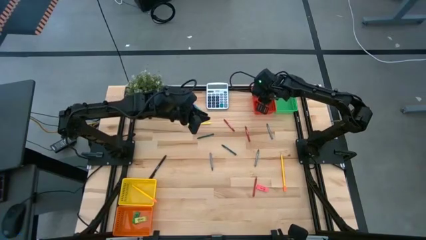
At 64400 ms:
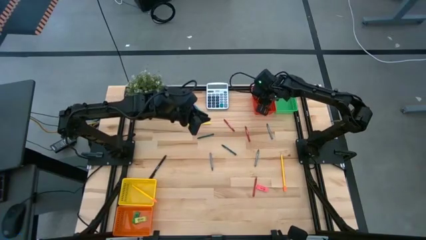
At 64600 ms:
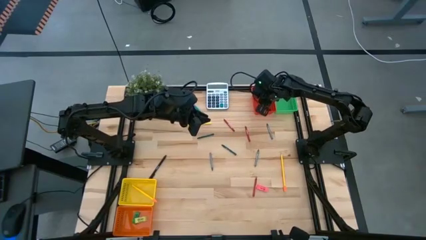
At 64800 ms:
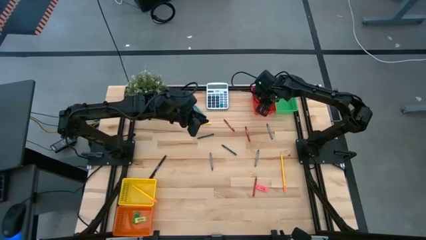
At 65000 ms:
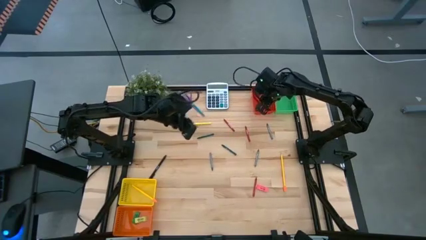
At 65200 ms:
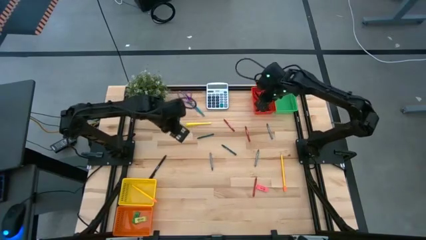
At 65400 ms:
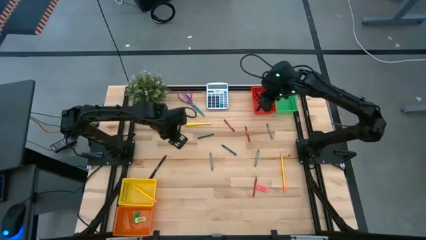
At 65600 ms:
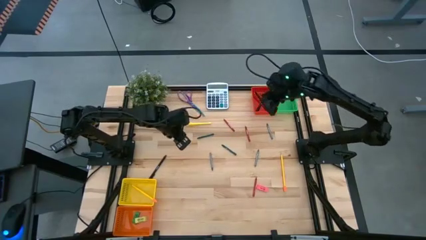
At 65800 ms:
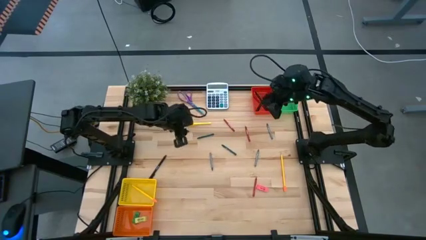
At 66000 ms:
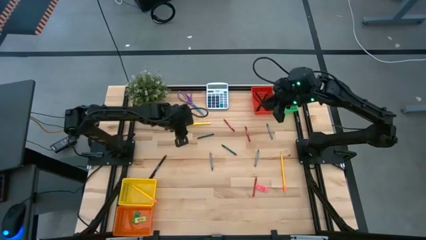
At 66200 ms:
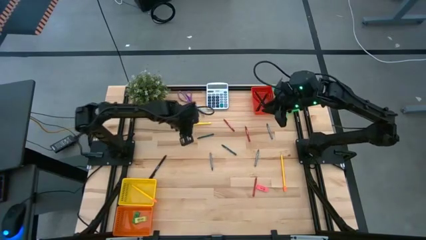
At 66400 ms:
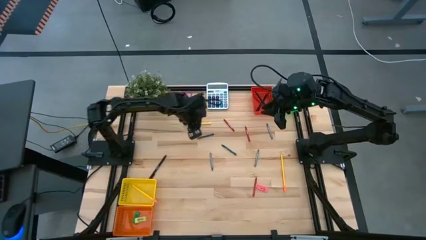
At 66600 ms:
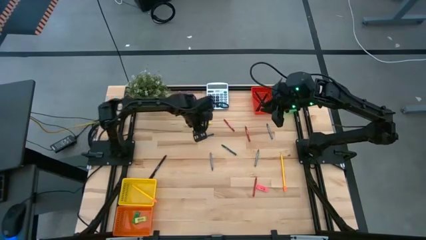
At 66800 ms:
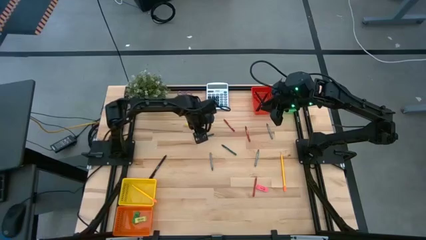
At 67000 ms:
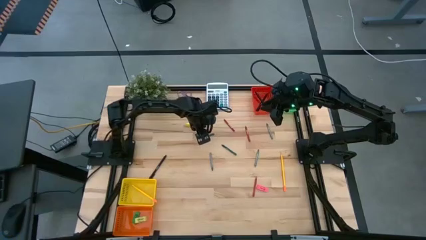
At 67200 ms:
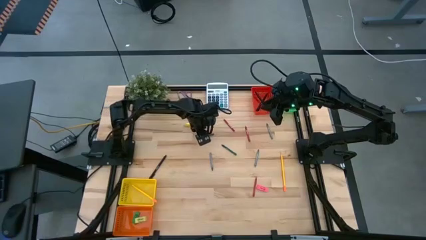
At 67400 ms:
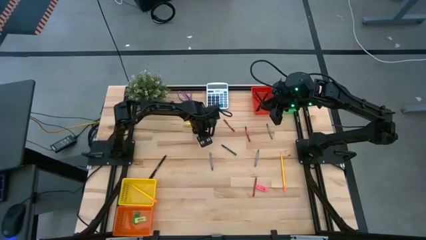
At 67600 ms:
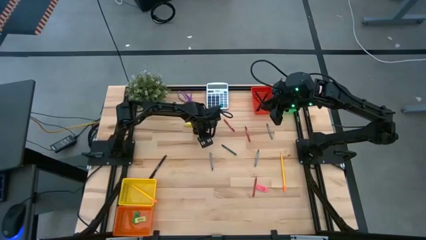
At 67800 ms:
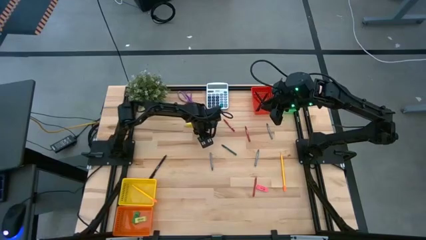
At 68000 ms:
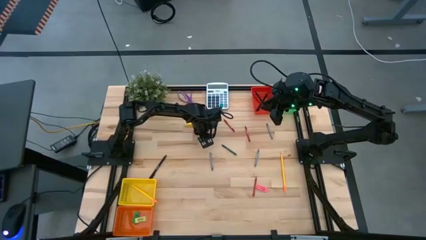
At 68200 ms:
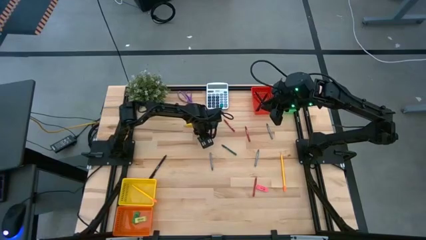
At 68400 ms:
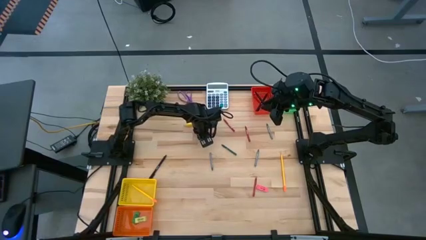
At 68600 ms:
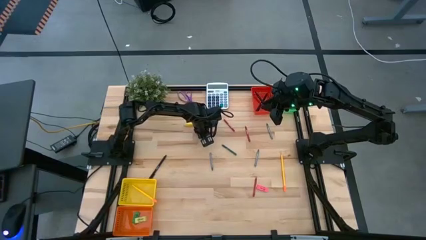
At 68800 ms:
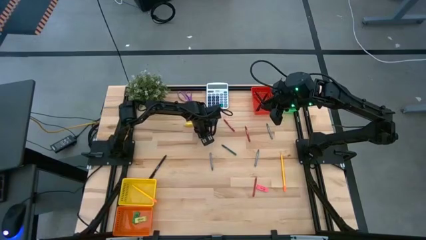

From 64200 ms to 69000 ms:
Task: Sort crayons/erasers/pens/pencils in bins
Put the top green crayon into the green bin

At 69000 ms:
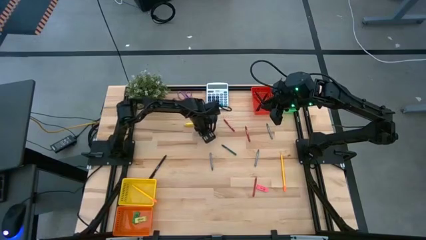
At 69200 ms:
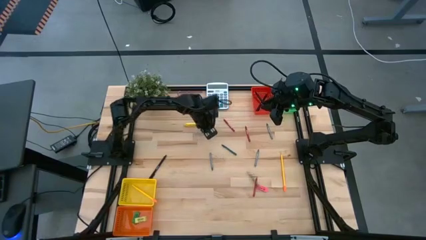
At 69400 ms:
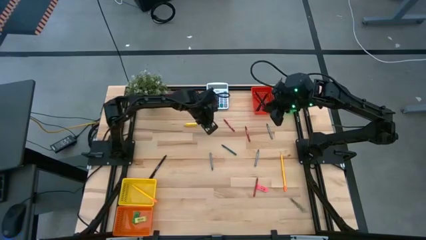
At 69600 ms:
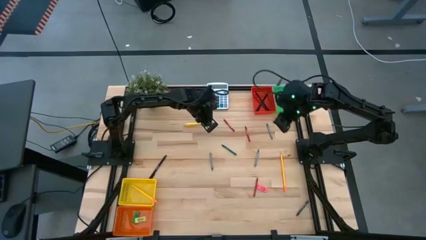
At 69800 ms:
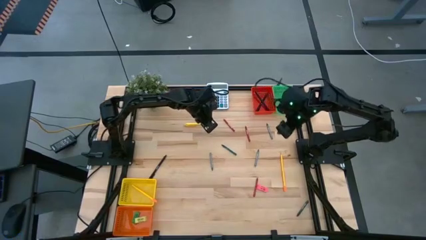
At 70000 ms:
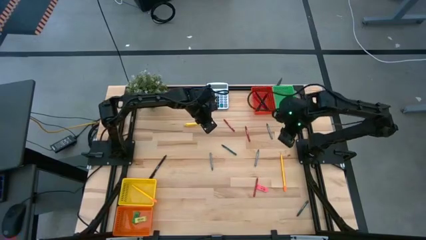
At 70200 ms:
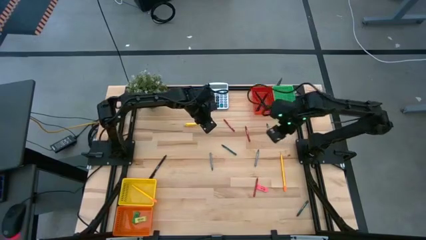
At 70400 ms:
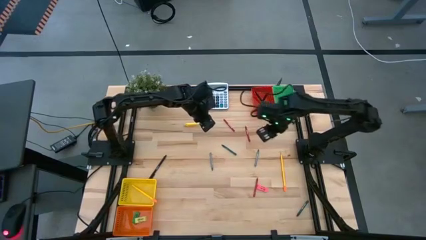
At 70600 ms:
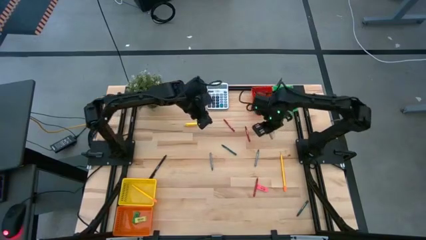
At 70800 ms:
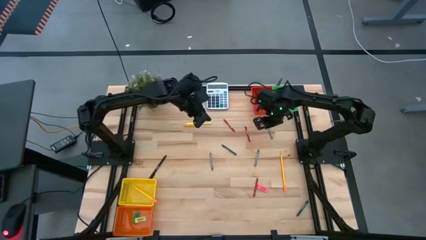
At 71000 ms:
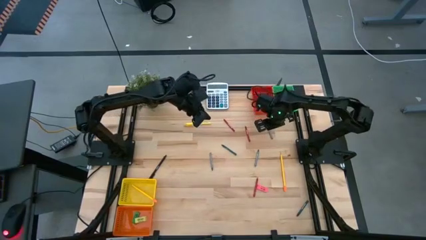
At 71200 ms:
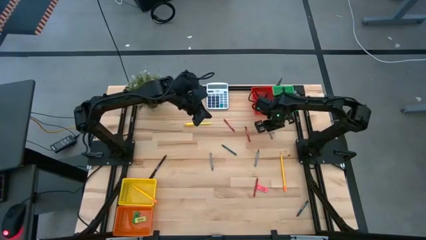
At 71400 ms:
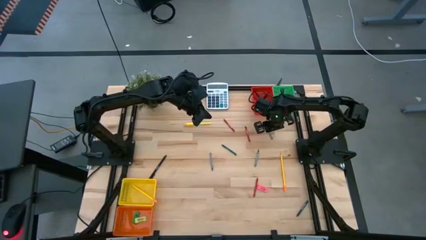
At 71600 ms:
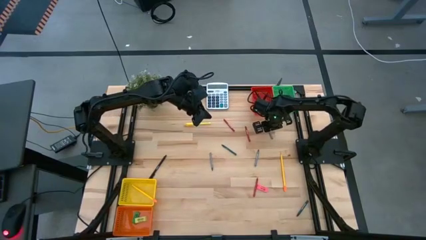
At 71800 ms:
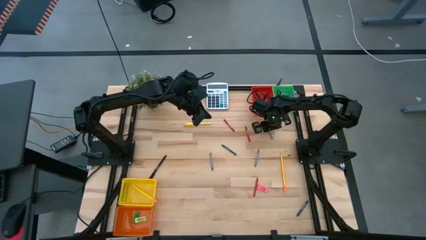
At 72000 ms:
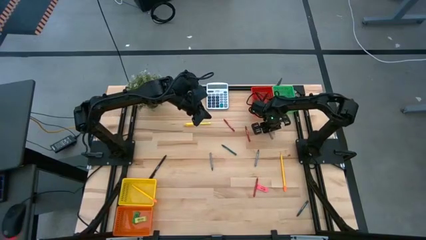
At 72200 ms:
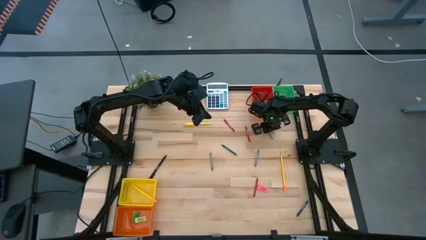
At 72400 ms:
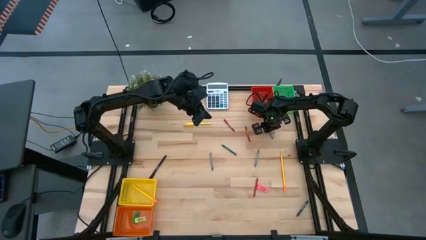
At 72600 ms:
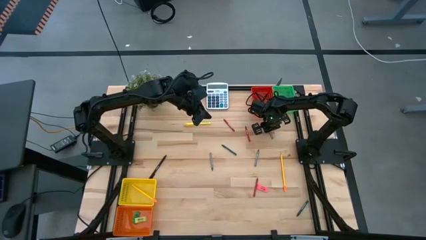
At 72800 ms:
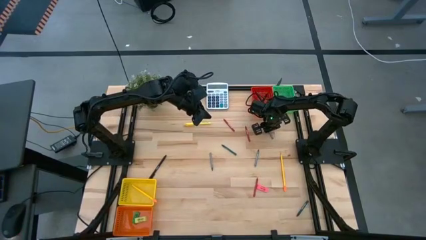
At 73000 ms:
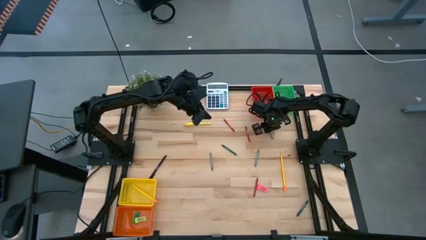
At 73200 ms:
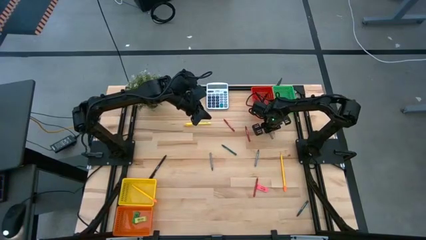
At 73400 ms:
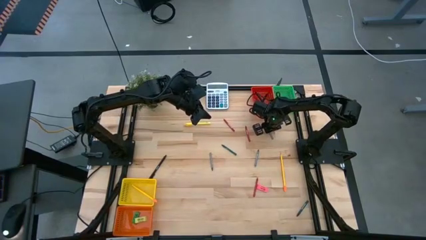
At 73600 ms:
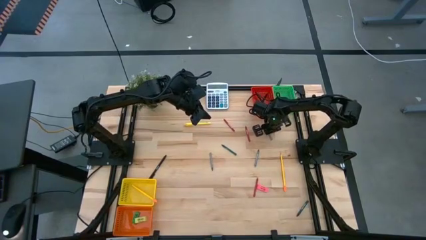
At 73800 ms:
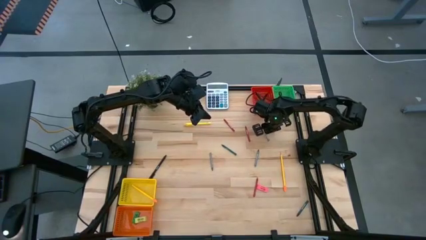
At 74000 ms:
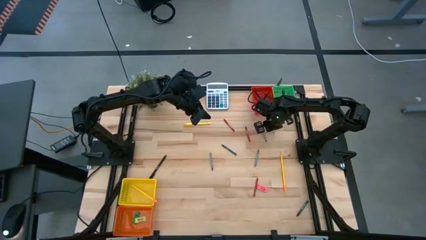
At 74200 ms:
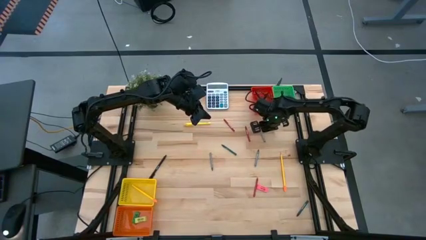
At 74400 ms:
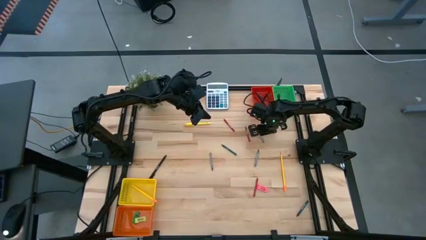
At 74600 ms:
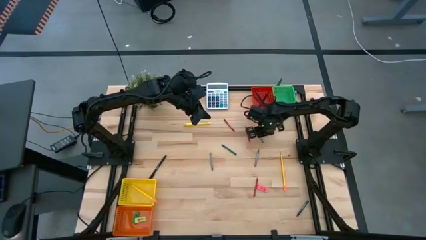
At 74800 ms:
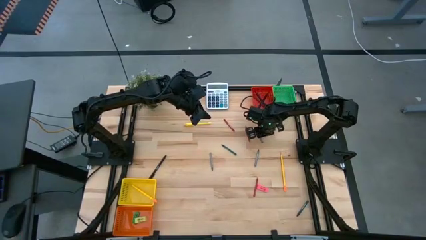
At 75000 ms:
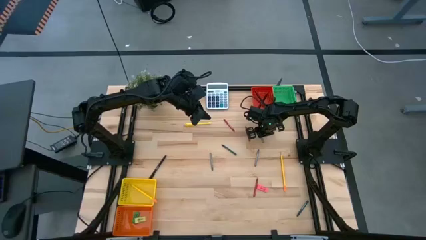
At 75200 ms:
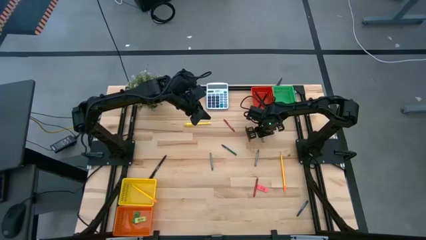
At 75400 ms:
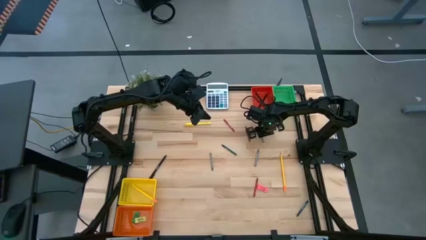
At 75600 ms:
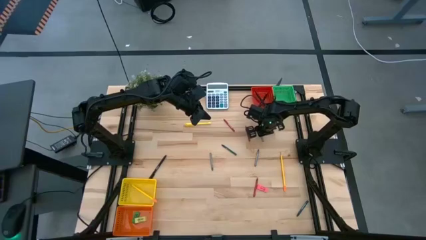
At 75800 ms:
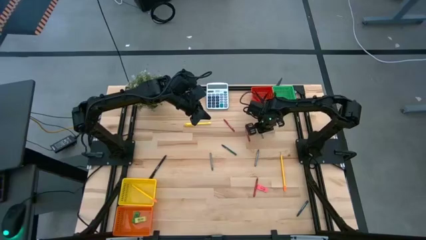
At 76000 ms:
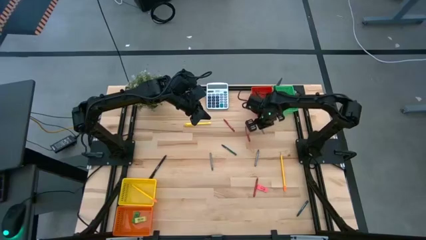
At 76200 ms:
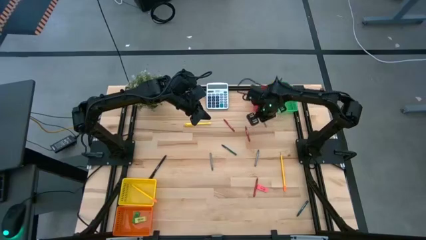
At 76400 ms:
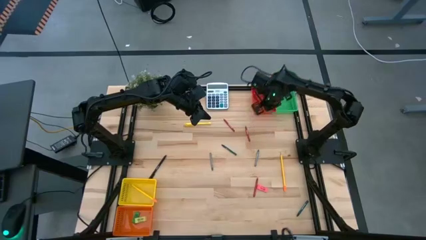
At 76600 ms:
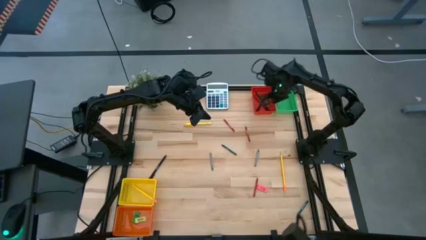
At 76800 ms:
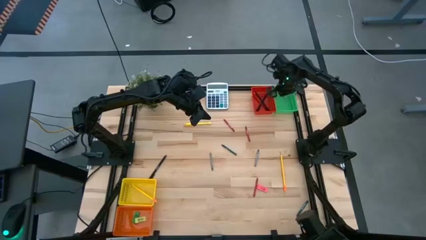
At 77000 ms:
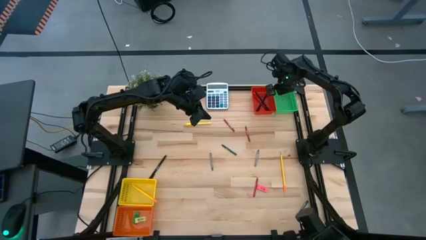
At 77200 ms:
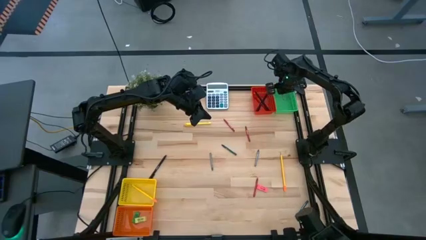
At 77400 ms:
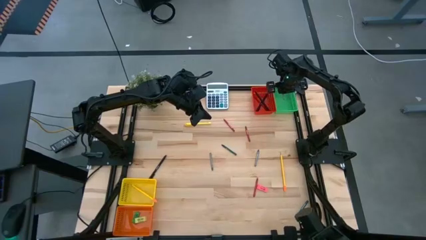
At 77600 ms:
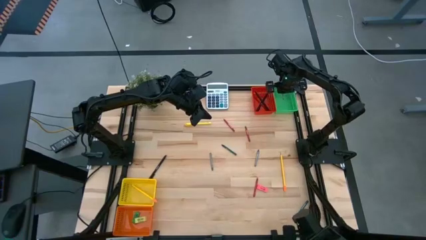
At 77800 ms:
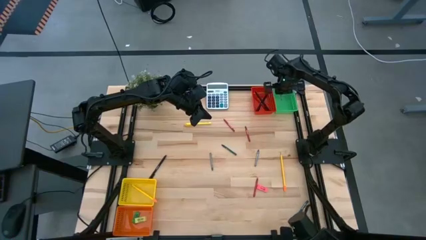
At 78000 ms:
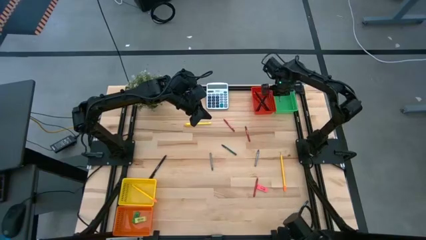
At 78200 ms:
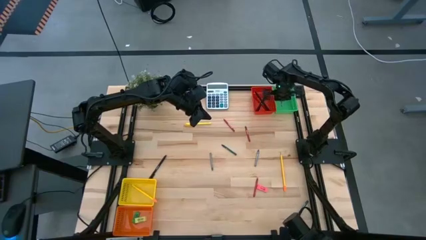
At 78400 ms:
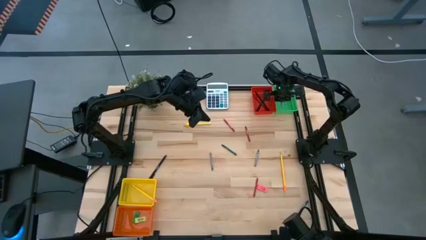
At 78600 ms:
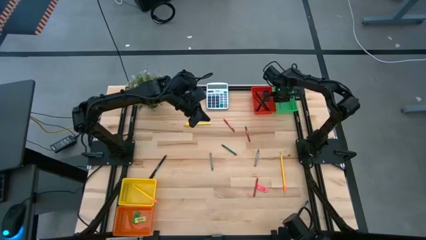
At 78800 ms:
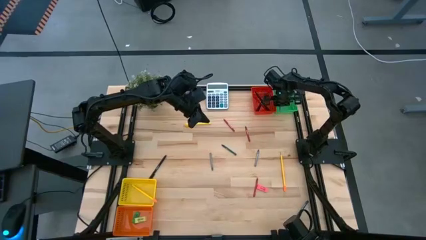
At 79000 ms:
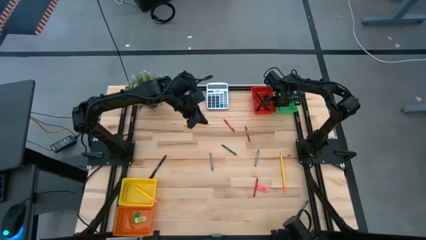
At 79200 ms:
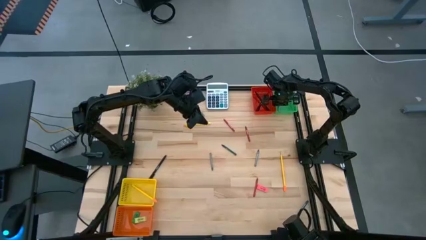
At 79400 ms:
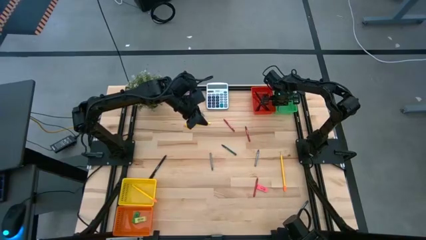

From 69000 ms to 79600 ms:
Put the top gray crayon into the green bin
